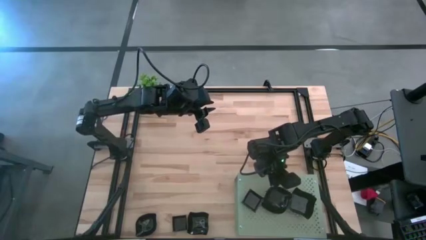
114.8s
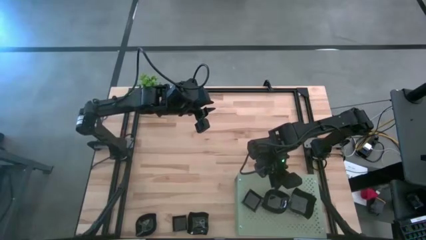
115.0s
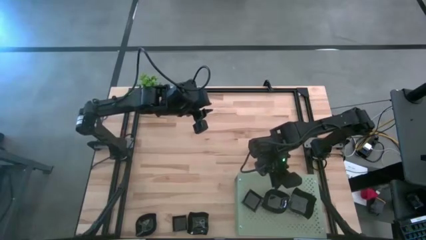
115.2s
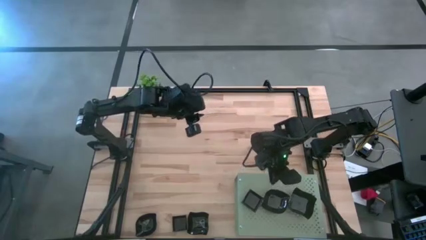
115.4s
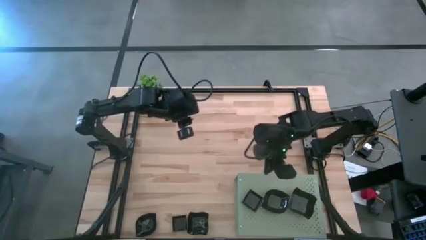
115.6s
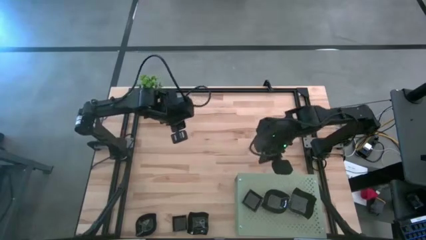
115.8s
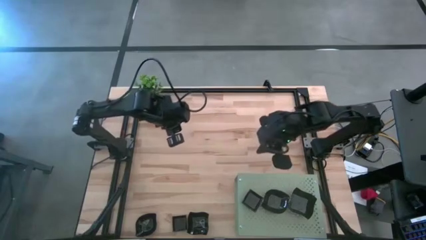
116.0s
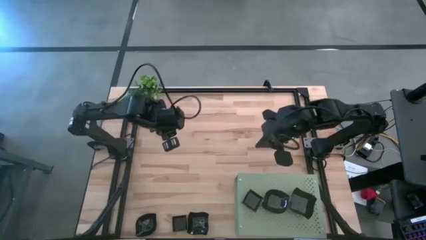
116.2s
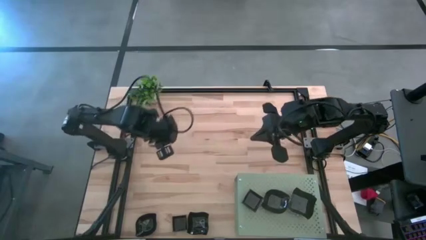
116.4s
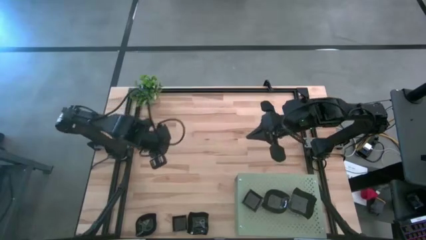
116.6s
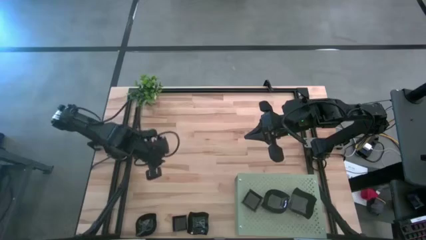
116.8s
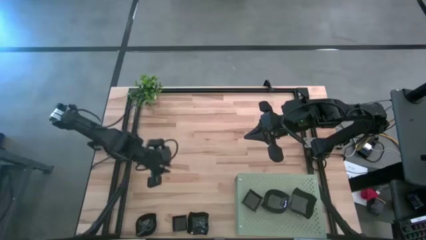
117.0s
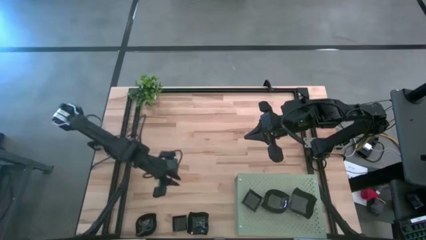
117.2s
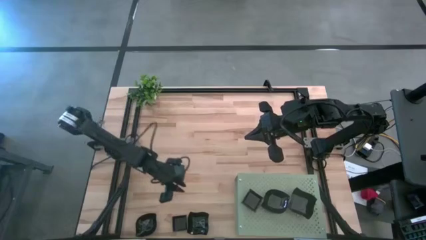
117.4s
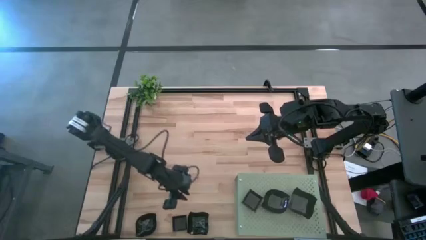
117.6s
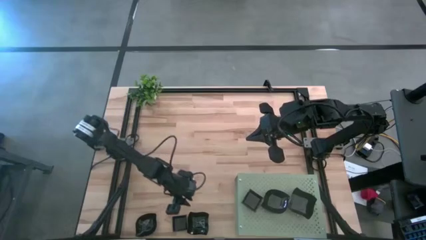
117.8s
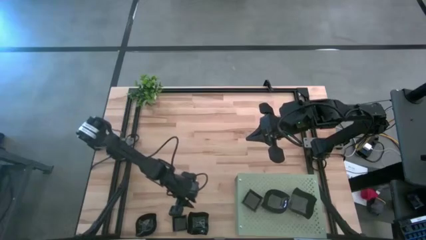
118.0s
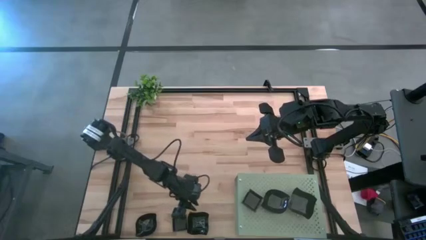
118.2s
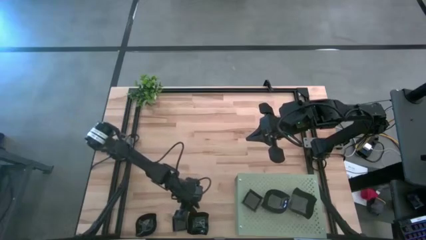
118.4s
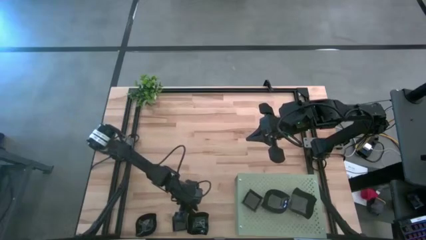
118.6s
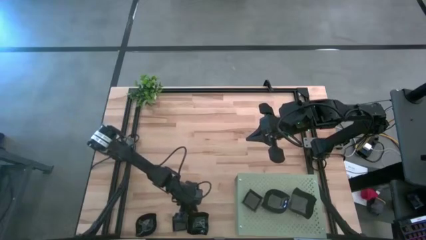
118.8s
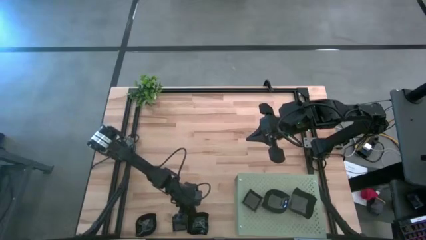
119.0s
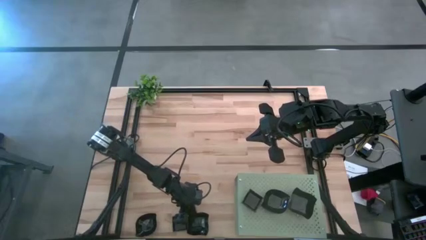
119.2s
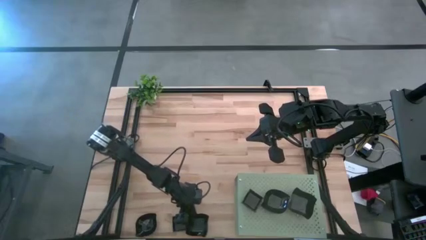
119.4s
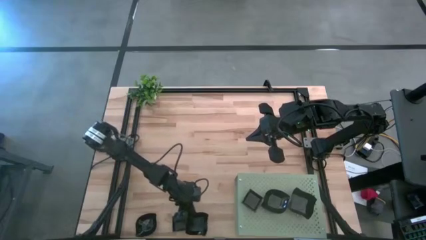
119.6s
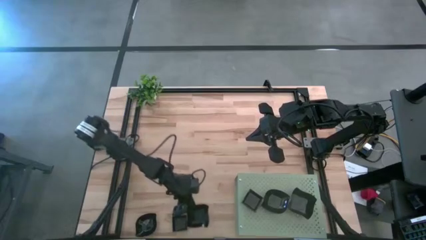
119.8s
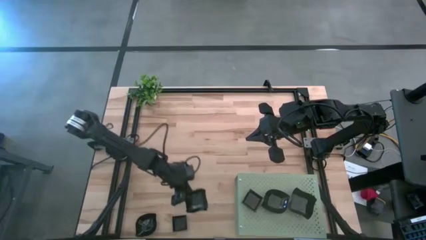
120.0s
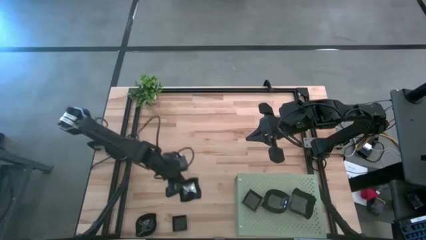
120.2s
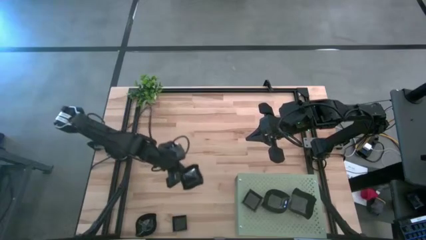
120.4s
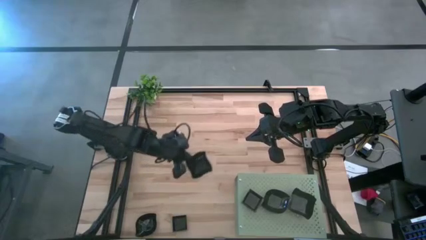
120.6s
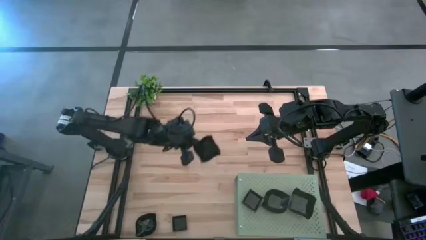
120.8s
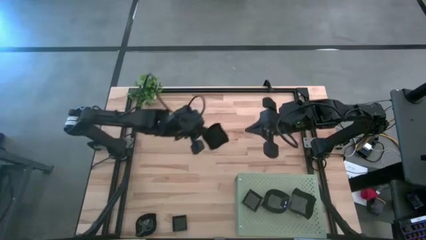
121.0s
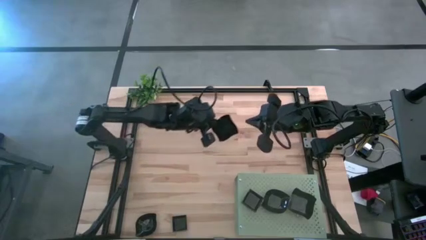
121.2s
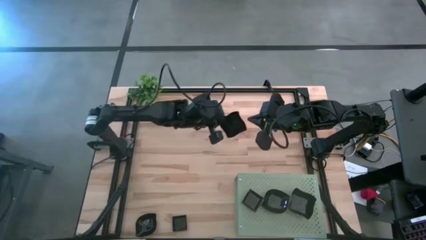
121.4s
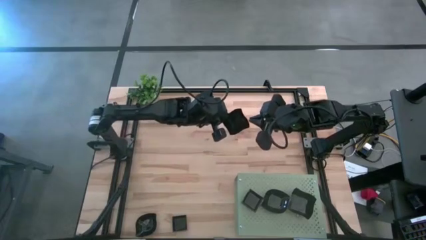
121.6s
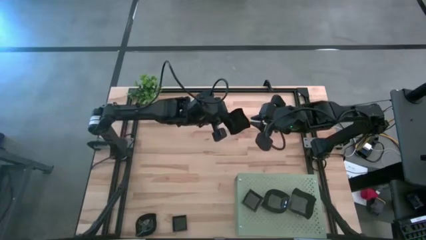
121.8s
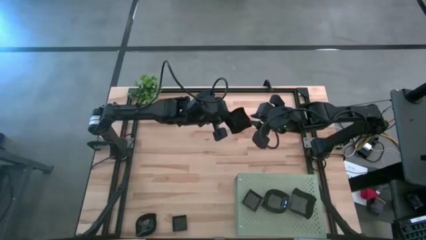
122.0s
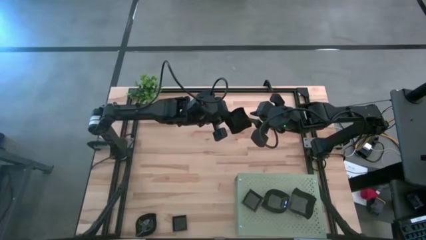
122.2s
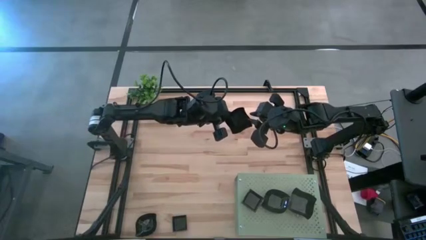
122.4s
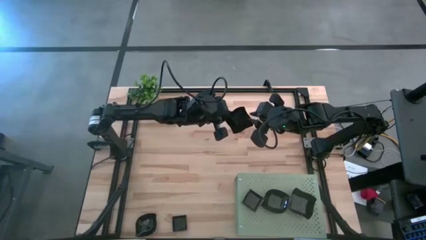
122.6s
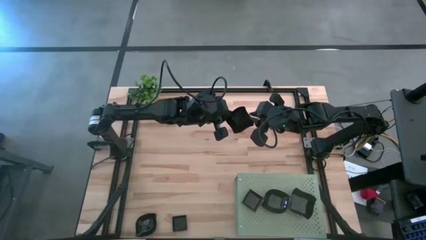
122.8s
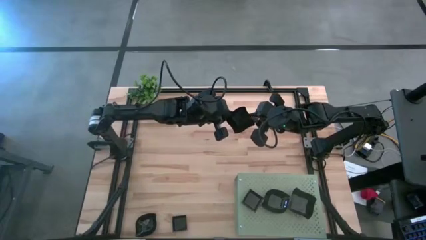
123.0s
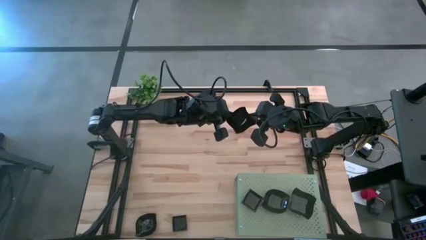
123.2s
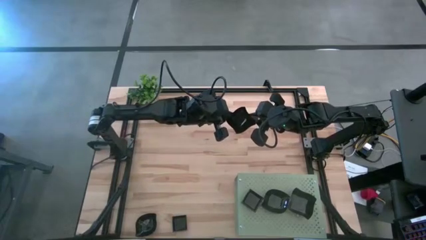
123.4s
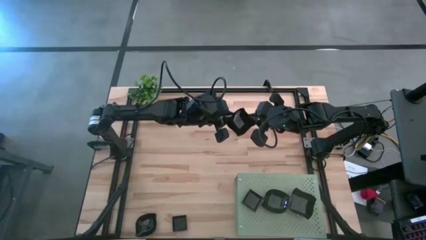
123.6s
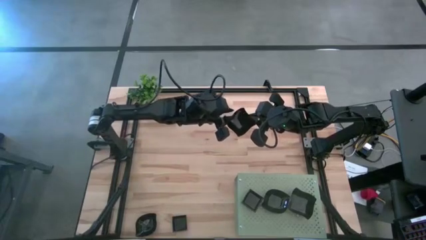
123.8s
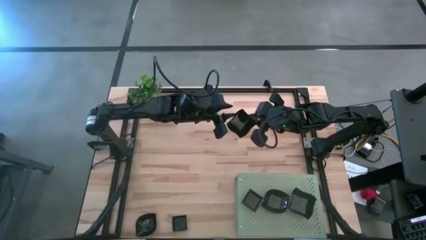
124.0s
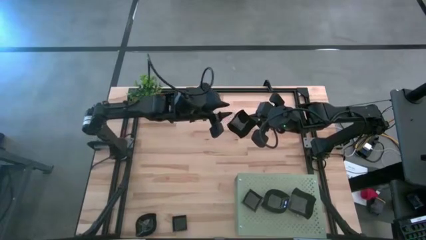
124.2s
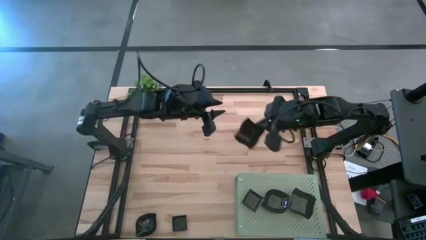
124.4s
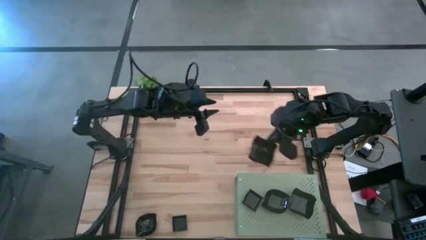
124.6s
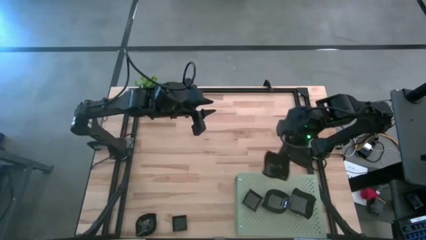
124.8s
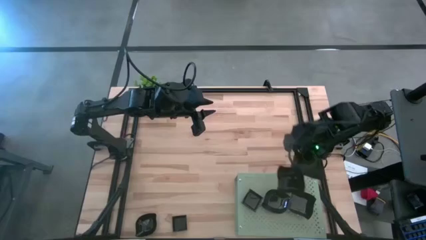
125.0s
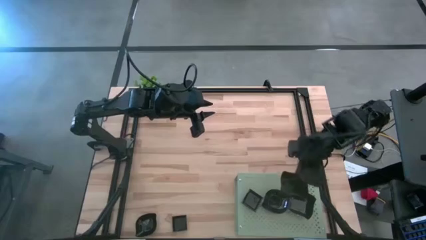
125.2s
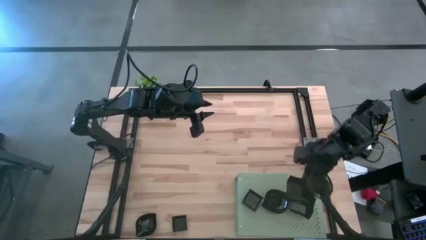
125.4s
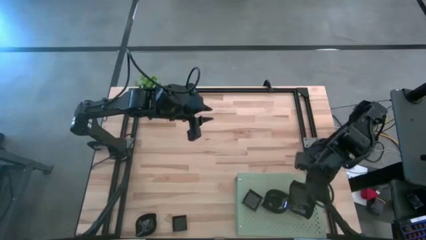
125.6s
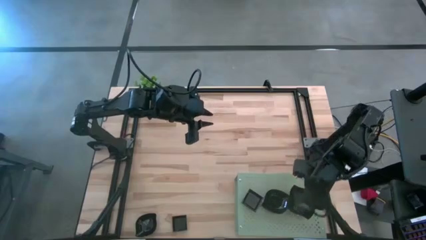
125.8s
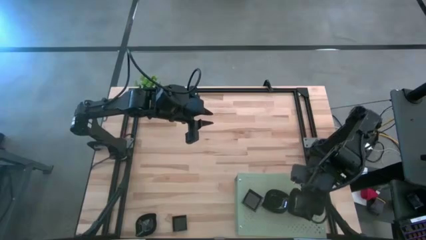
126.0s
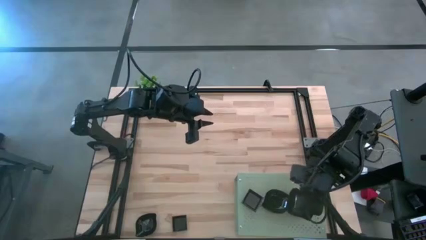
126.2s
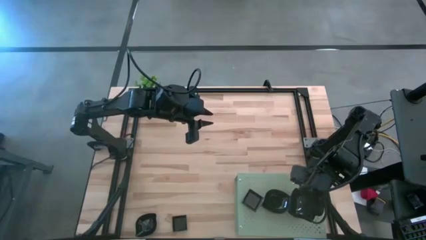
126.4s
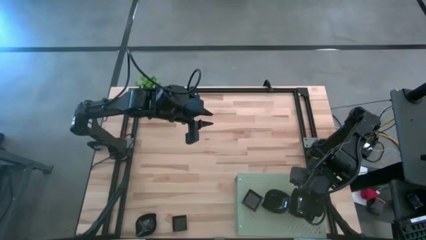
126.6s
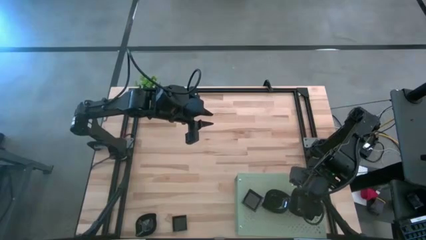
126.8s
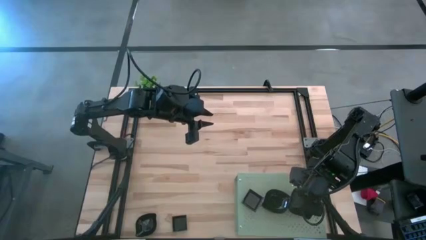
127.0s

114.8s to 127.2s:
Task: Pick & Place Mini shaped plates
Stack the distorted square plate on the distorted square plates on the shelf
